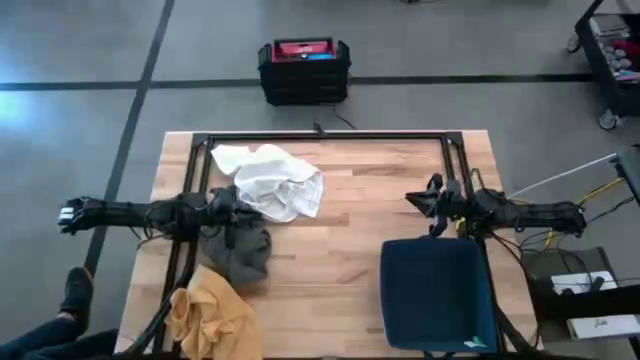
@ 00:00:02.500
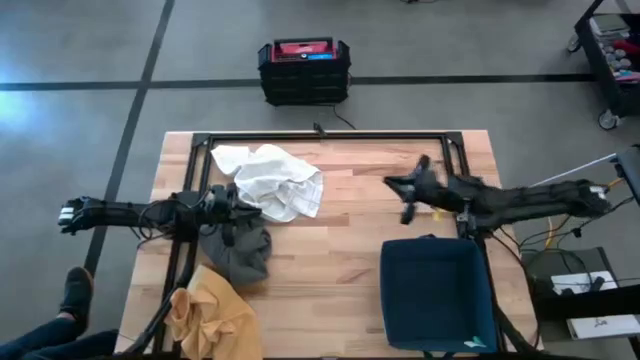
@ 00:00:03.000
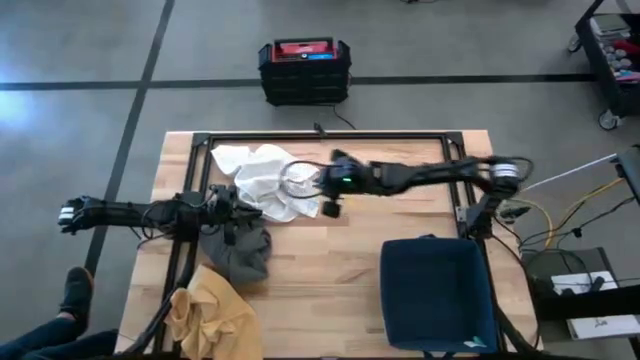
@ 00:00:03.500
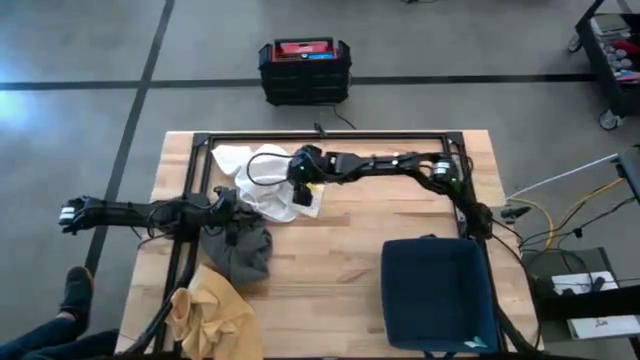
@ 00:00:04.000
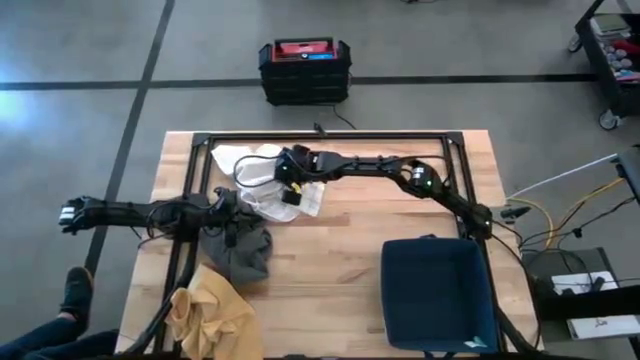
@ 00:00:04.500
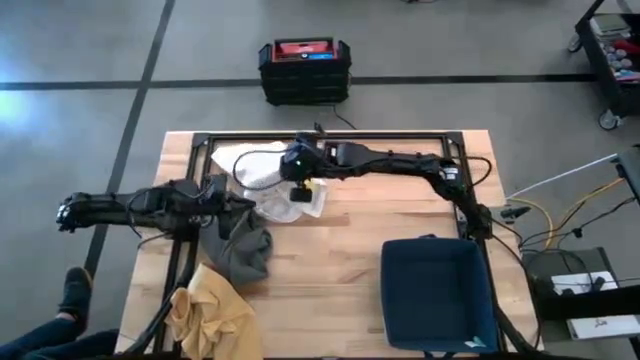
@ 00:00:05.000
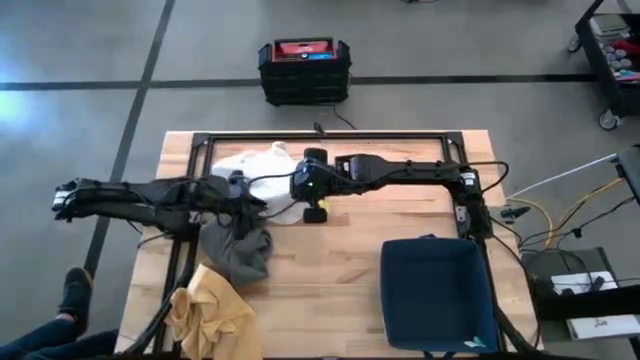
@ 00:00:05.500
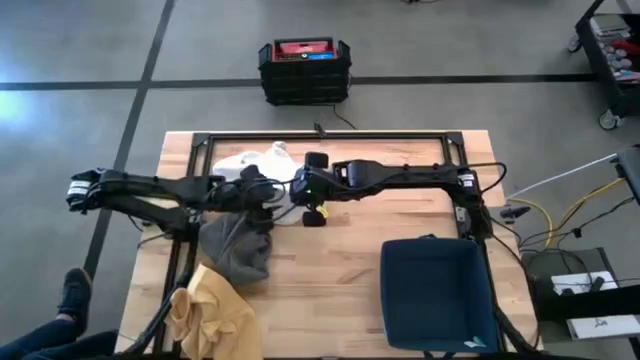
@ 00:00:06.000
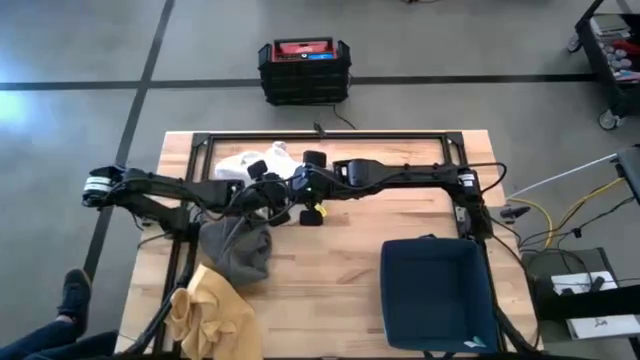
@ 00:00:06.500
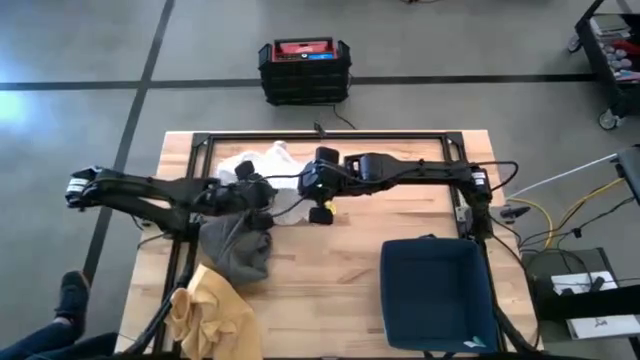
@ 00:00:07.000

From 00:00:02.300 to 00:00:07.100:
Task: Fold towel
Fold the white towel

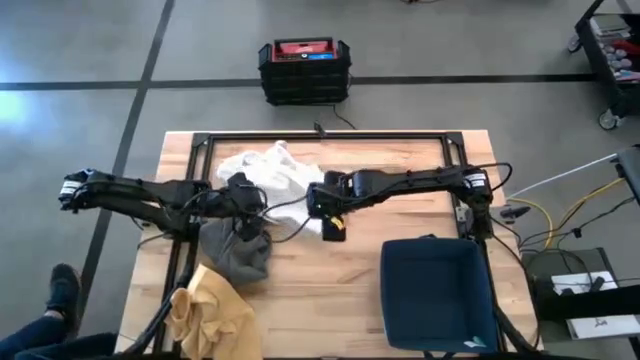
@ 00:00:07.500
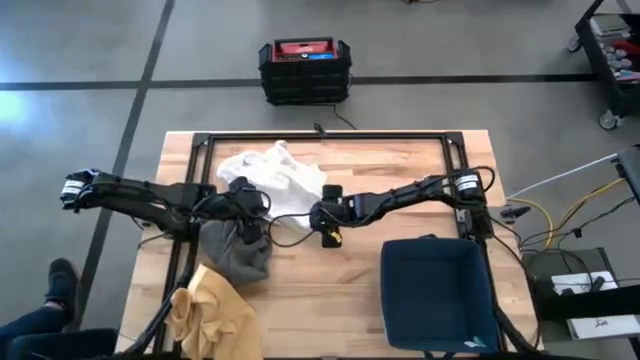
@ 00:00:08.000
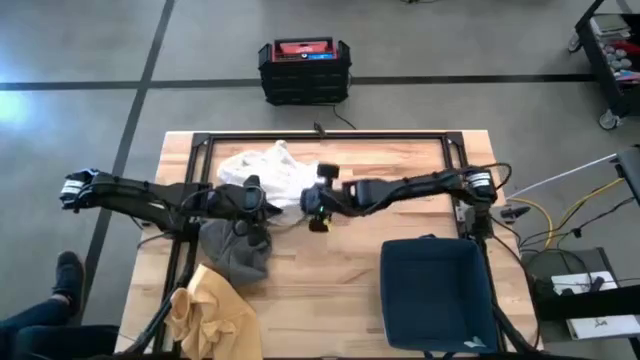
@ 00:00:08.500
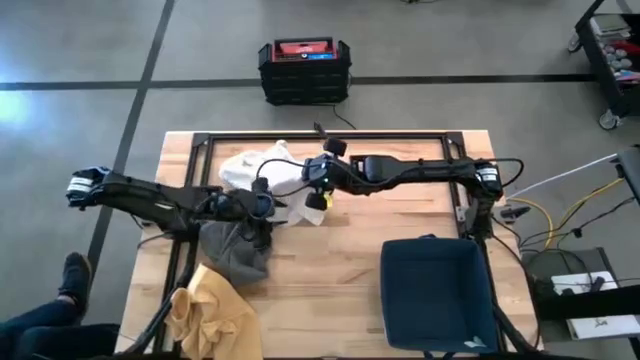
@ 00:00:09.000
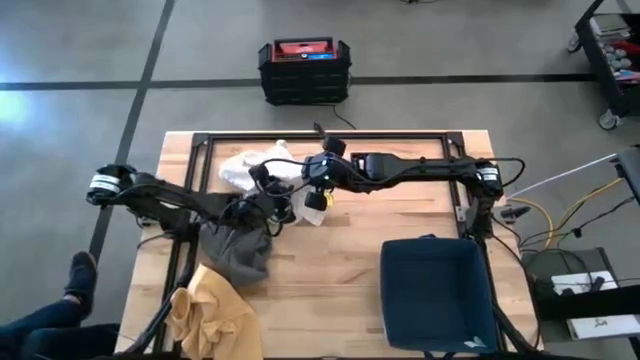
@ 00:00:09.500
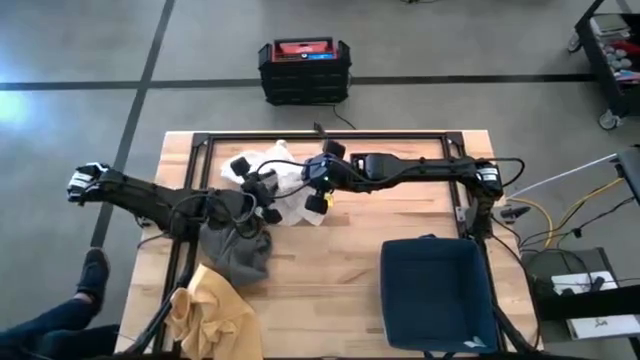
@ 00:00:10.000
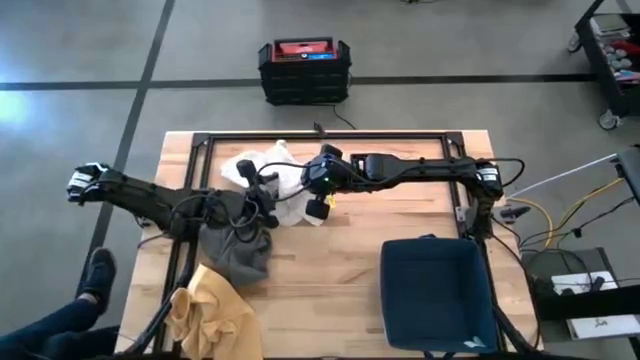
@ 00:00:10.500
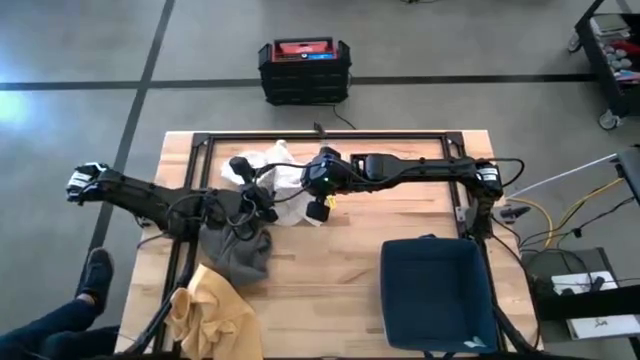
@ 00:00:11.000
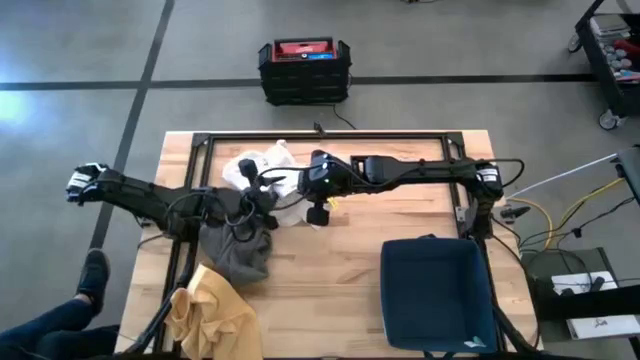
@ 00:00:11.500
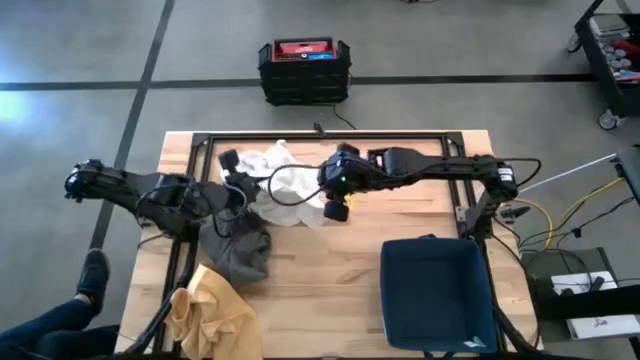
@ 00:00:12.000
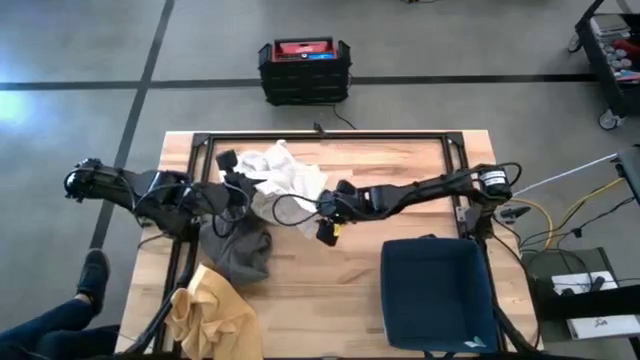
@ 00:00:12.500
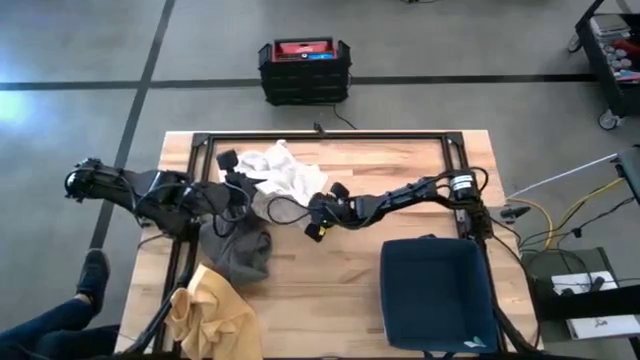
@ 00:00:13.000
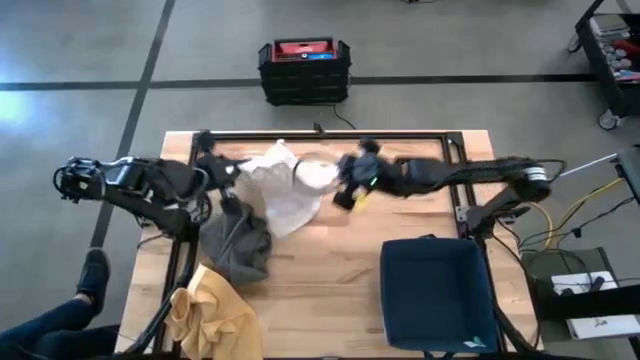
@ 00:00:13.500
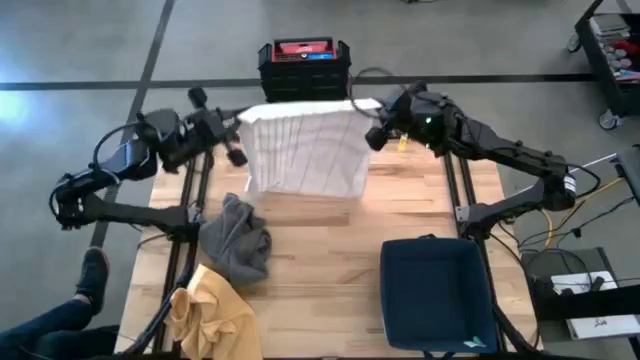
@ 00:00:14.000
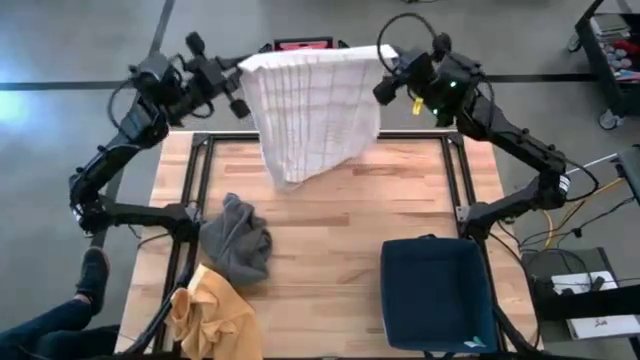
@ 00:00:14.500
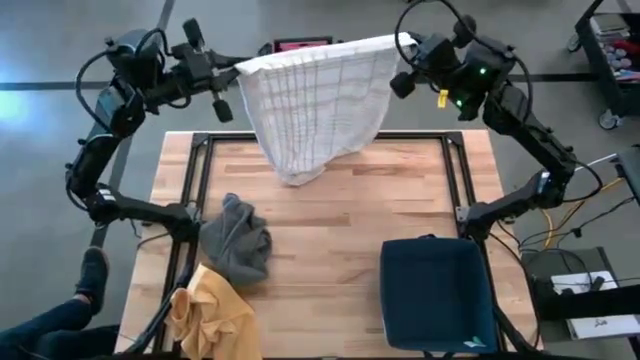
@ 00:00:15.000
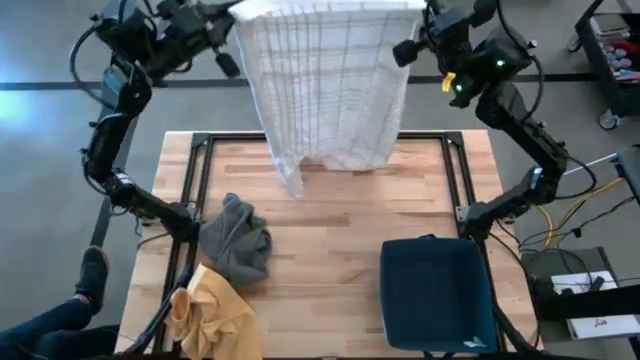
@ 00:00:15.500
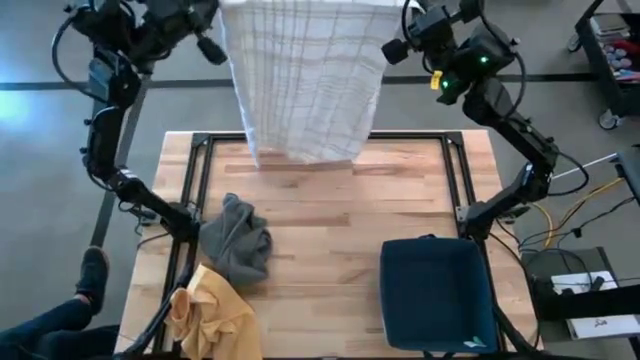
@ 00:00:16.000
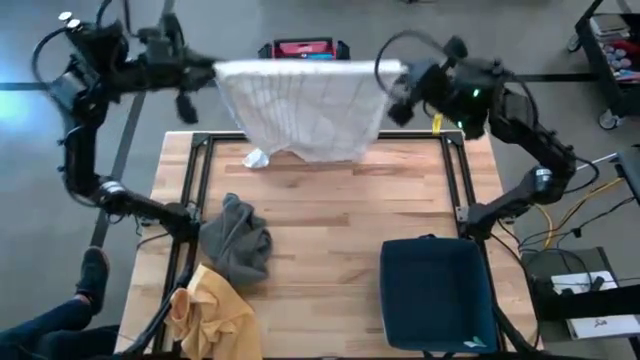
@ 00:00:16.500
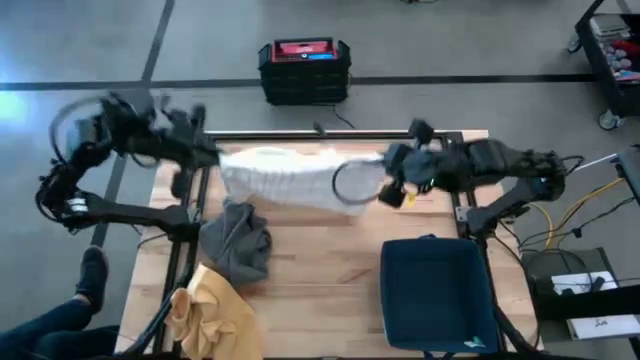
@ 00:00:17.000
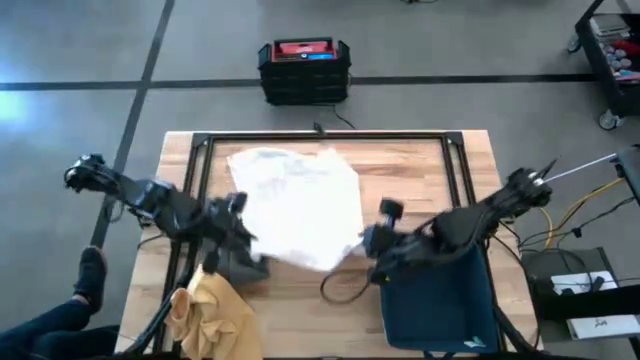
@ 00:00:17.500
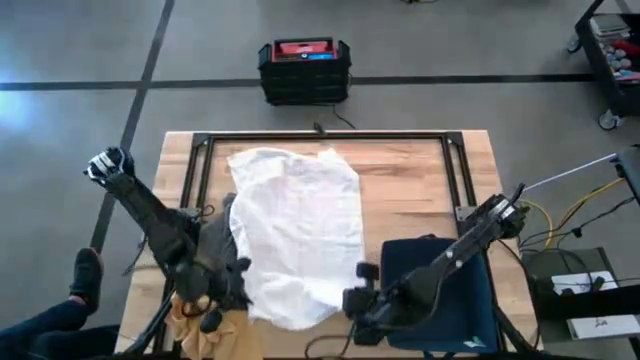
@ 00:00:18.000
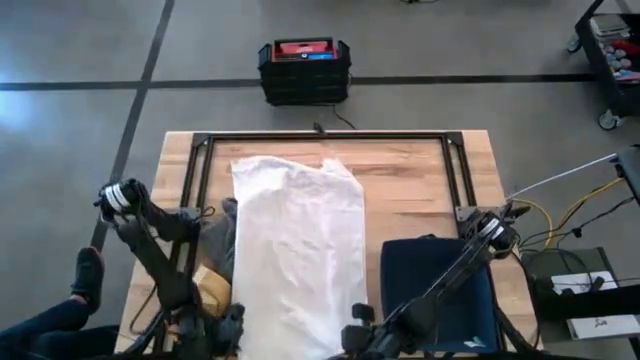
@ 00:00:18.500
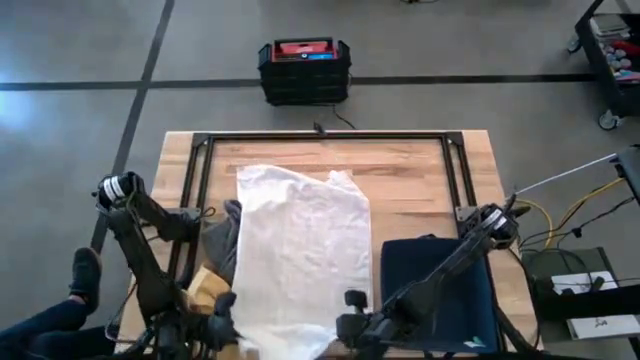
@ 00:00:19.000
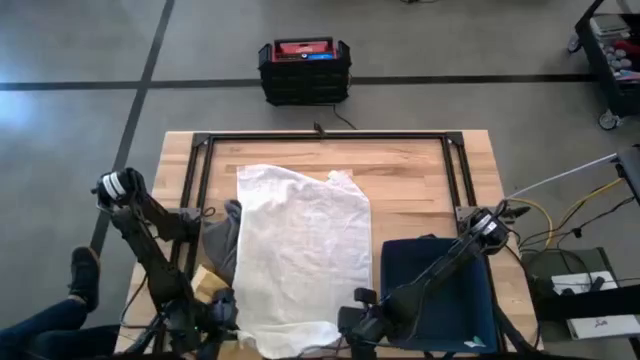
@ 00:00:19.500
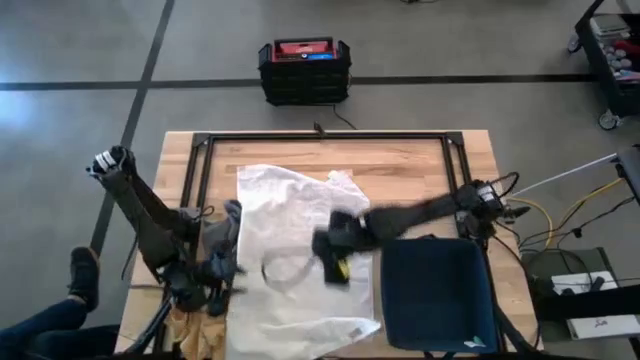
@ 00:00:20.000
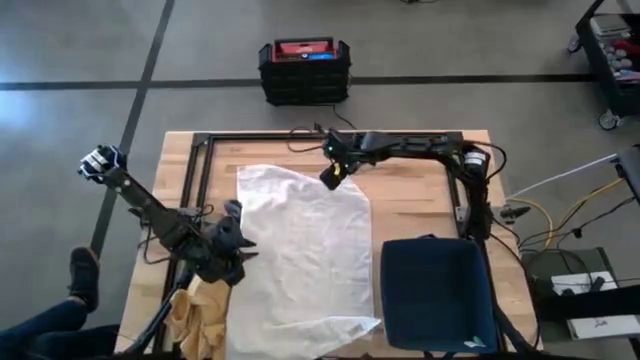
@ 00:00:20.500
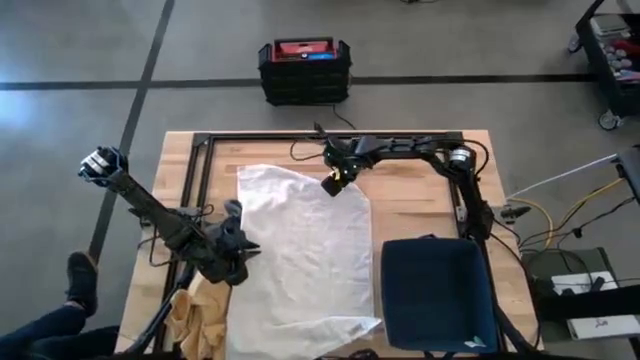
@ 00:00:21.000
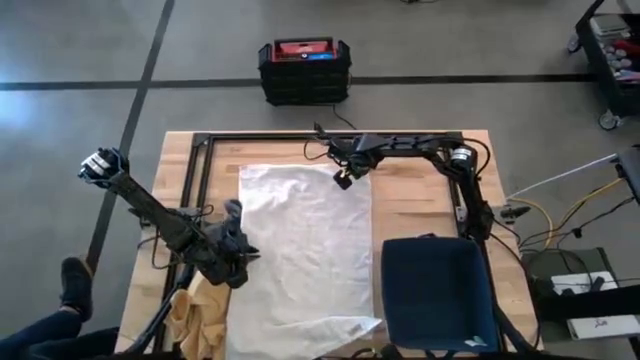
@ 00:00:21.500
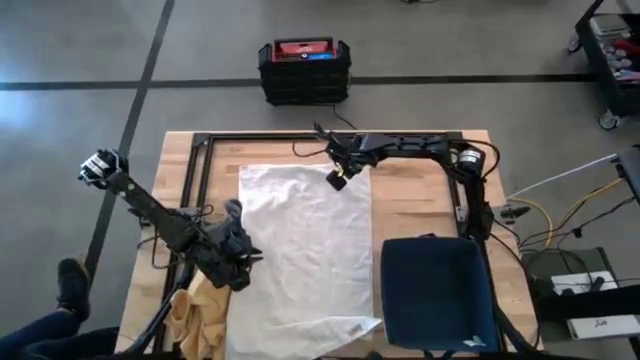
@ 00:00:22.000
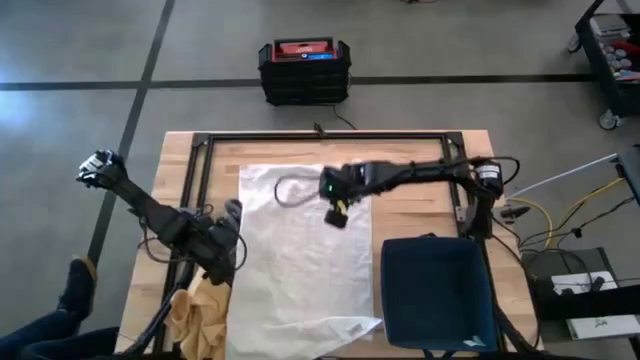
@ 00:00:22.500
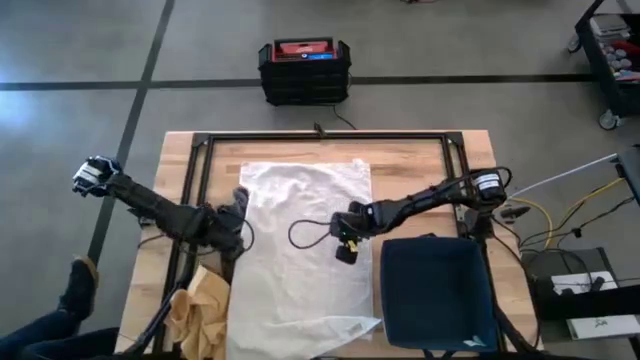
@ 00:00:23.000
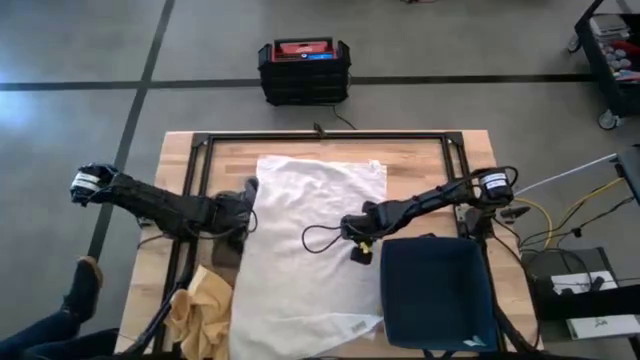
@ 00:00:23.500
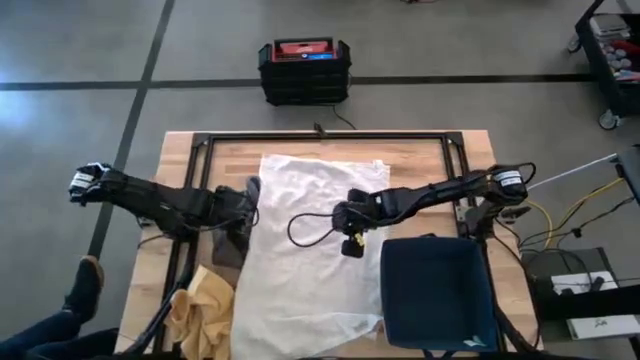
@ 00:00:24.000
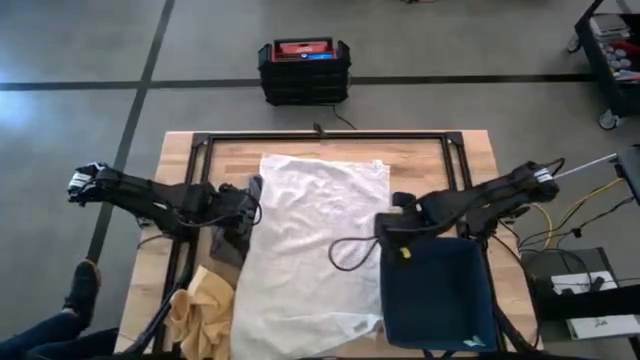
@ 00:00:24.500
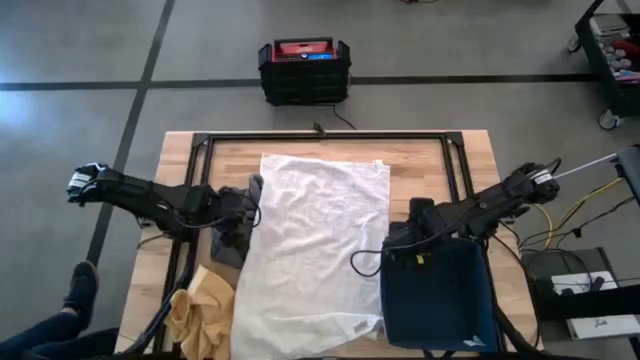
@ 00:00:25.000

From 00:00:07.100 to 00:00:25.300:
Fold the white towel
